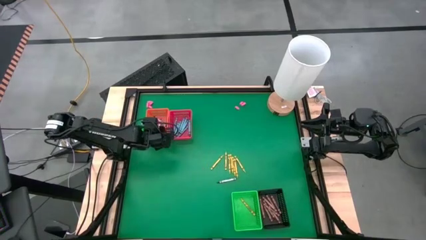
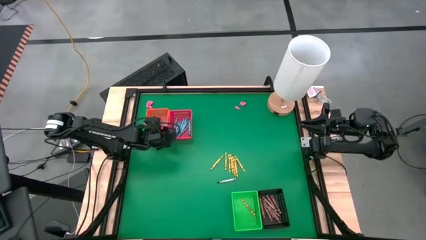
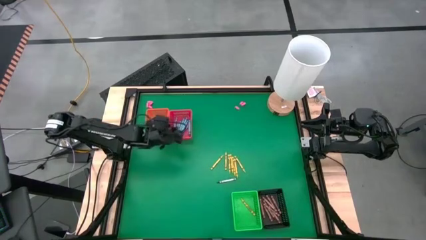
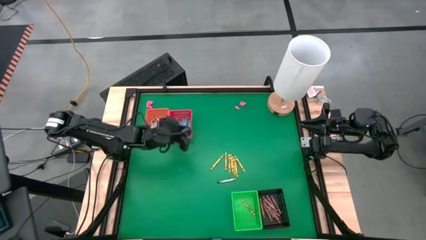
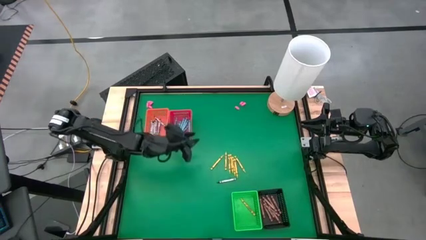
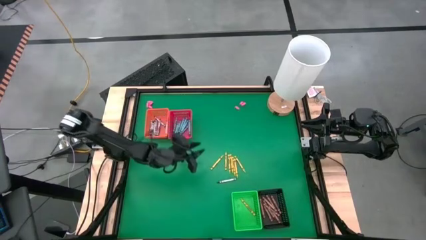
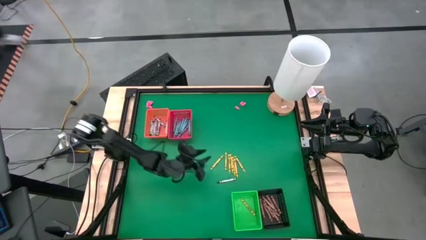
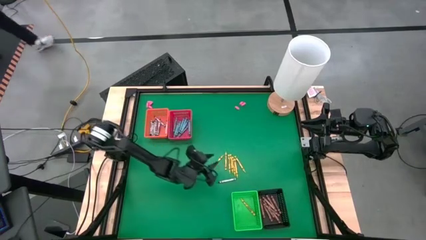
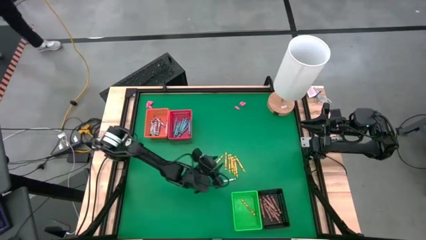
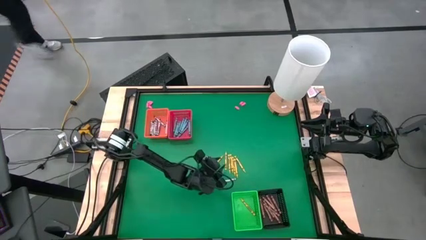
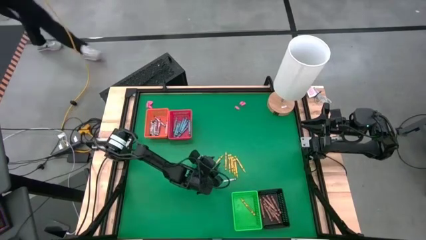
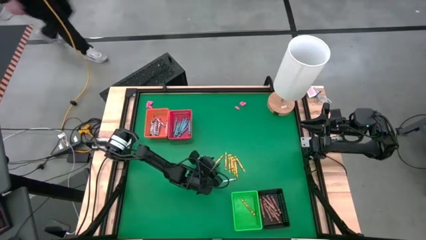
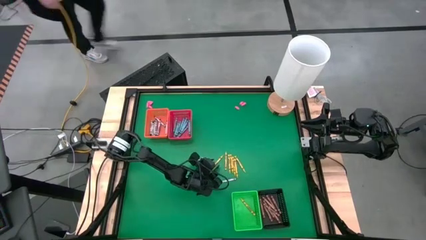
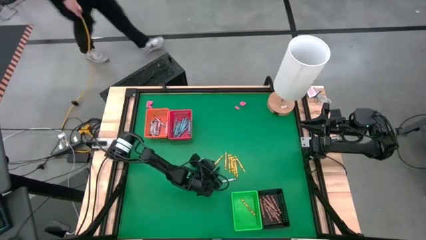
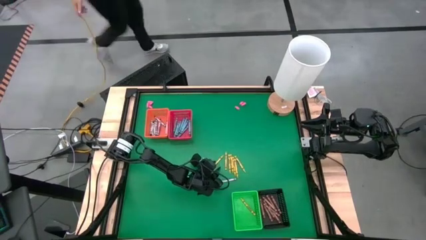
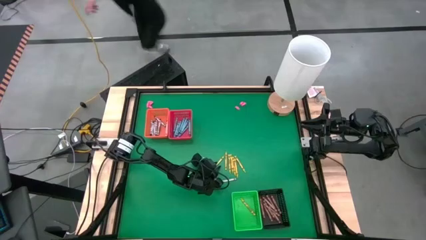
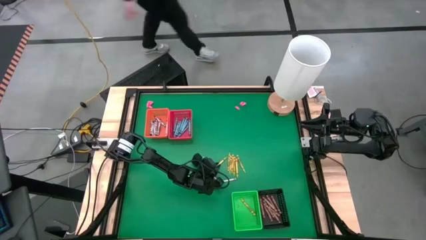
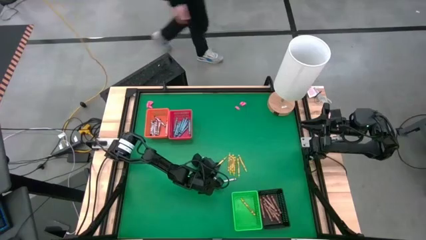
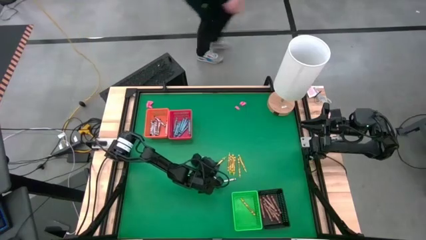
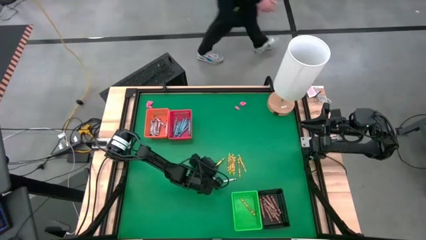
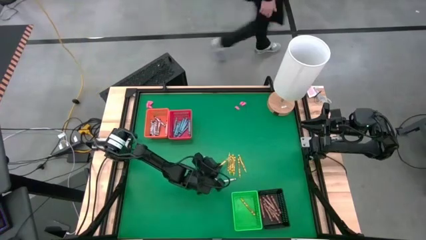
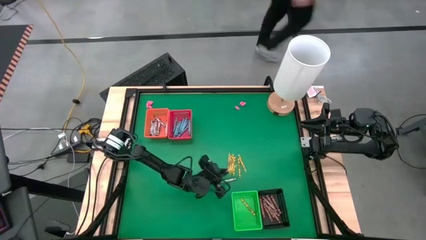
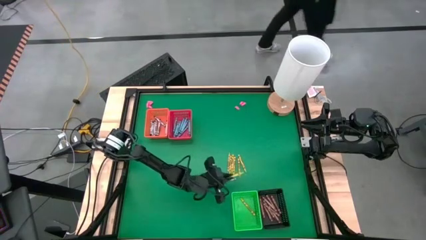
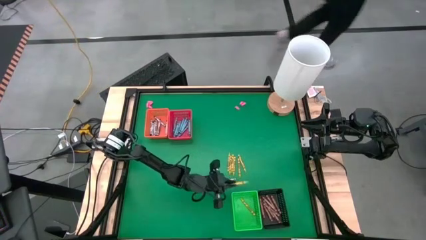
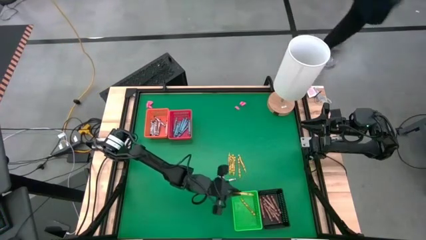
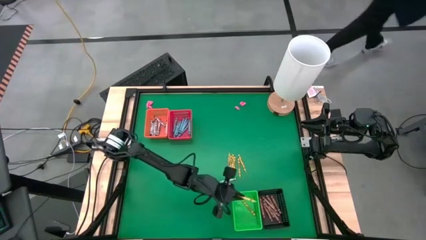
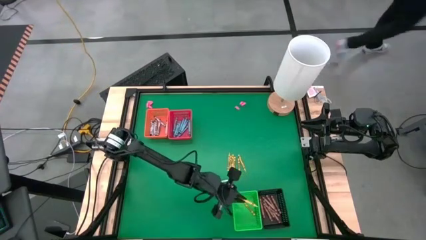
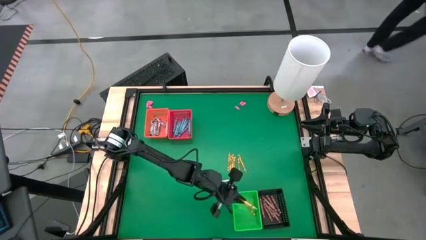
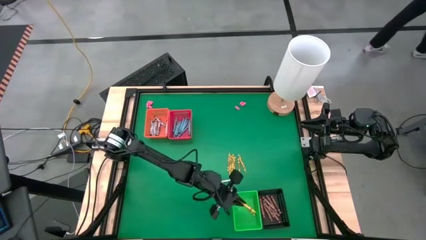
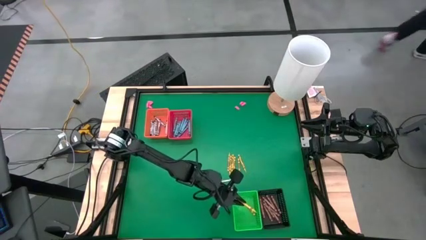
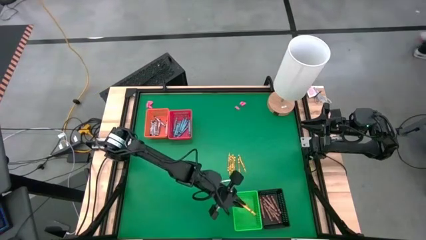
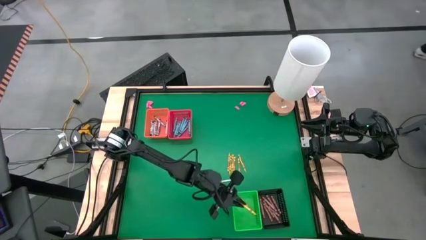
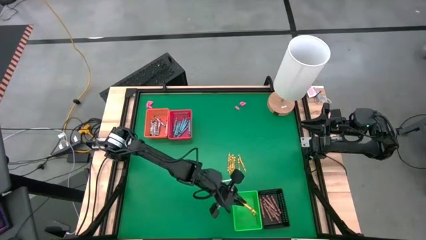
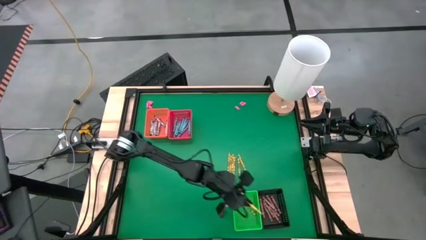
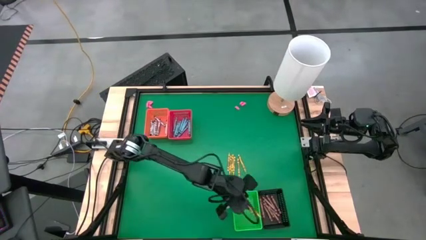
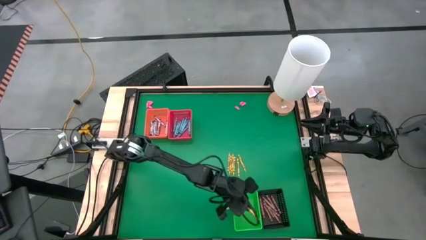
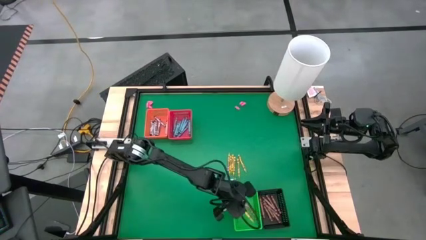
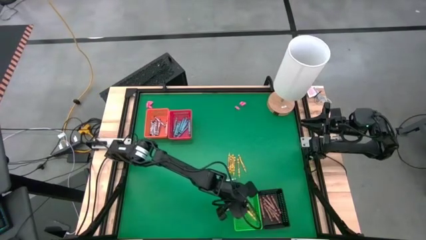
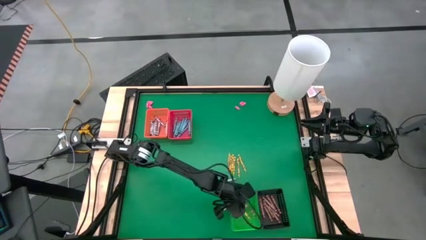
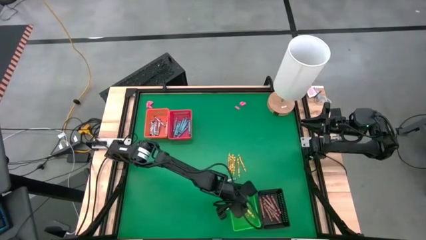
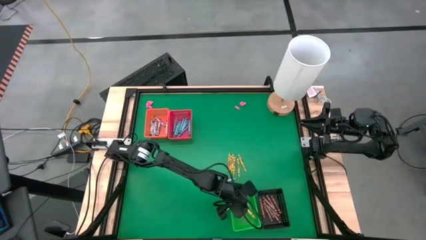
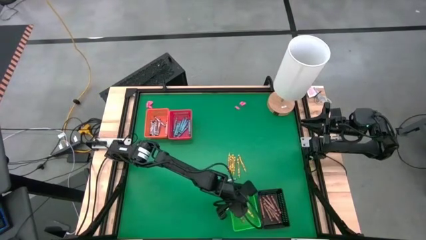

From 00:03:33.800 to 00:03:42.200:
Task: Sort crayons
Put the yellow crayon into the green bin

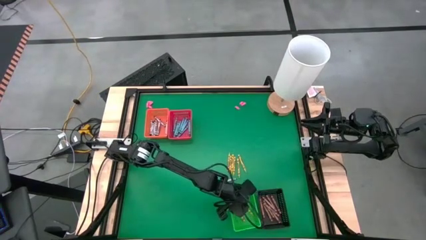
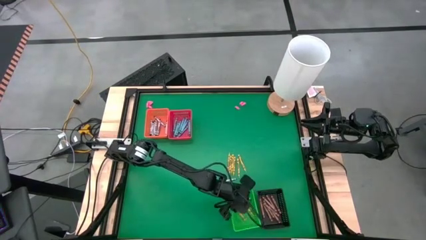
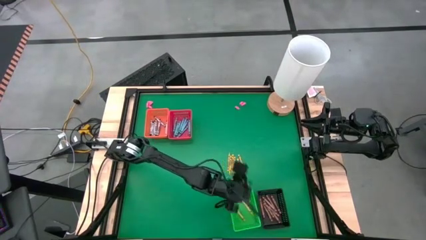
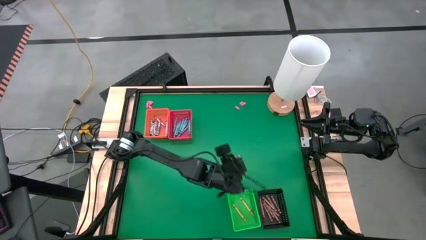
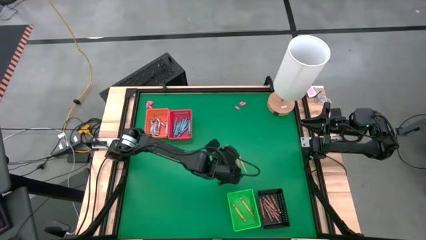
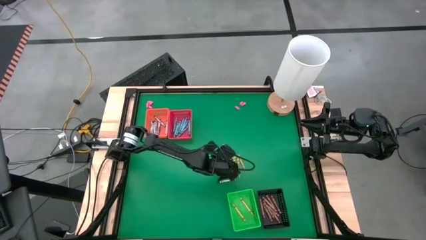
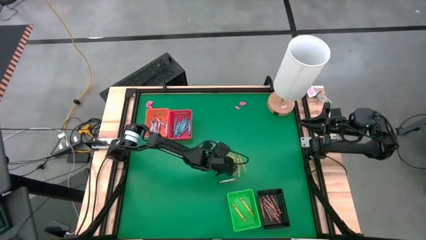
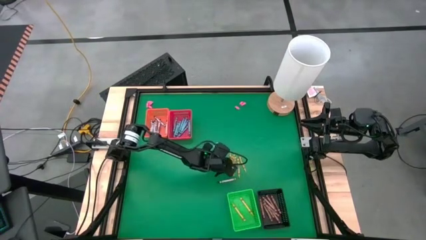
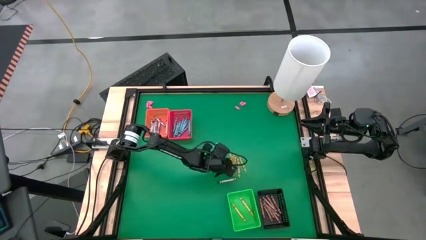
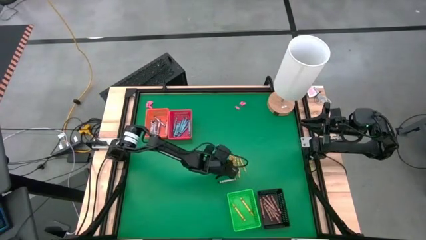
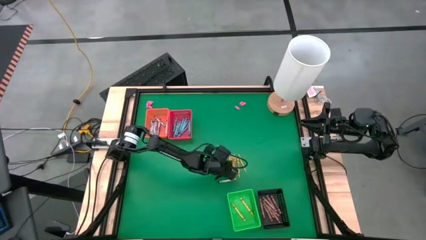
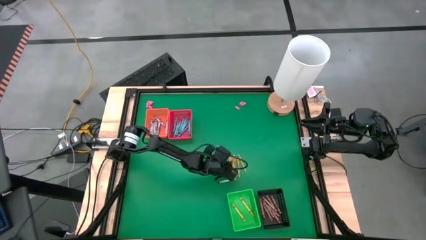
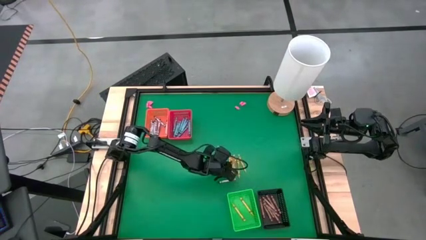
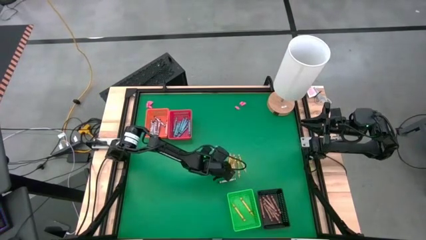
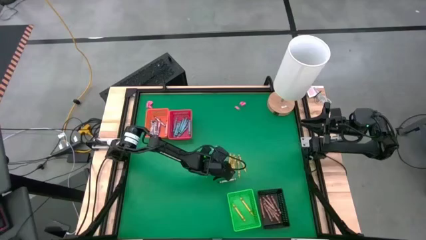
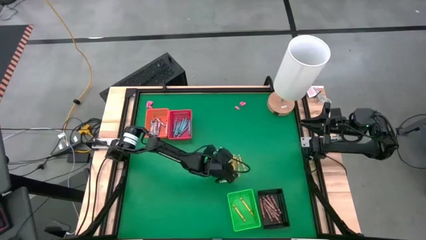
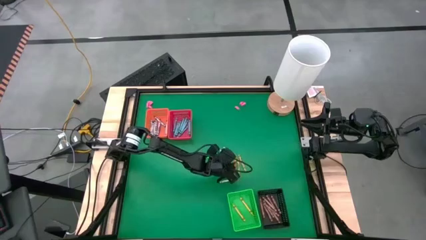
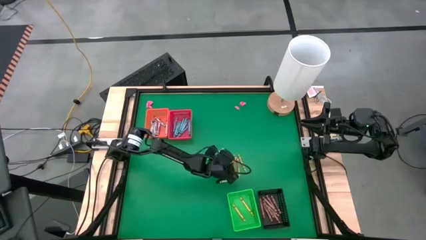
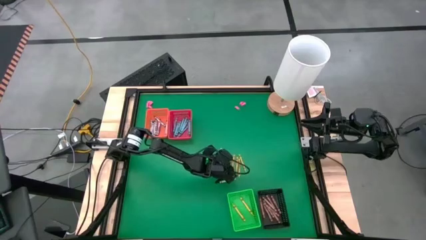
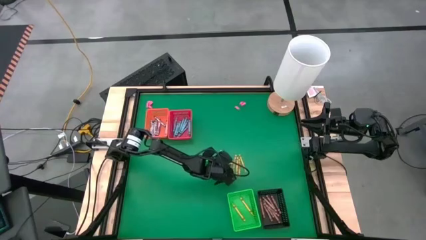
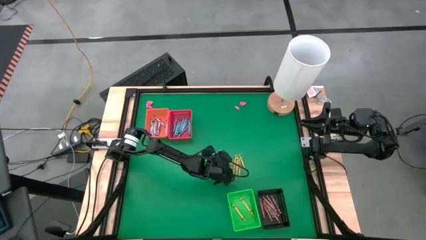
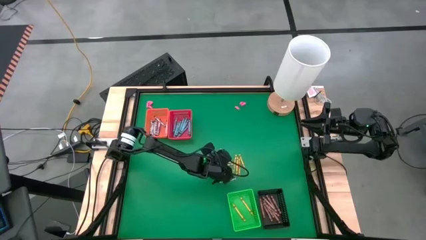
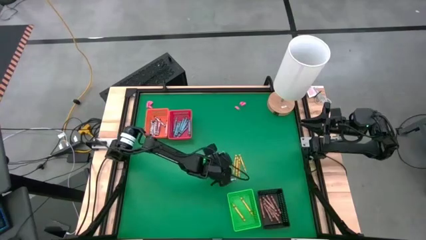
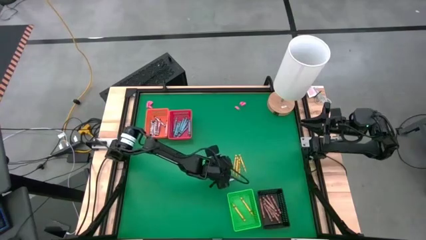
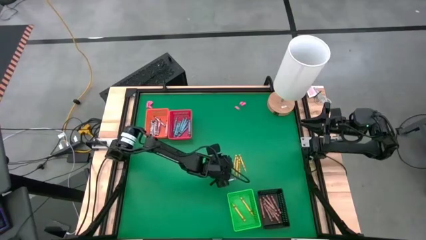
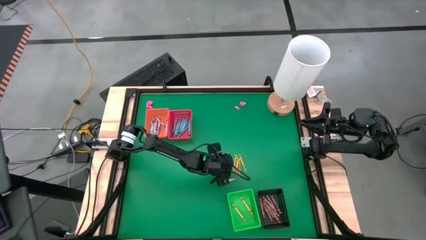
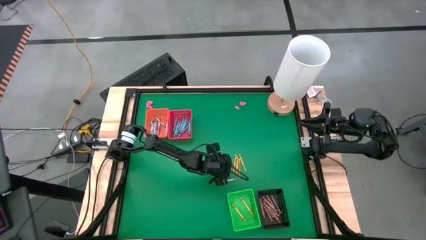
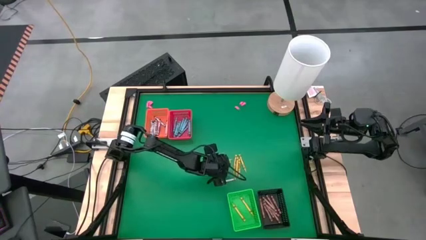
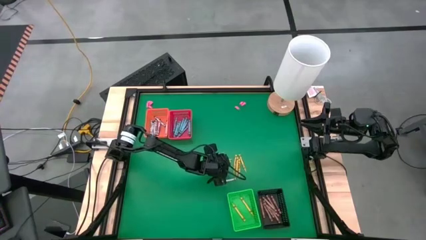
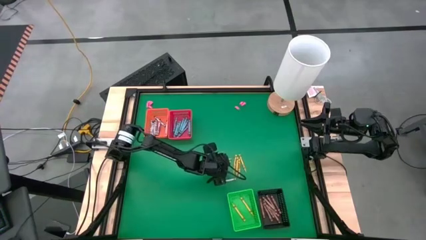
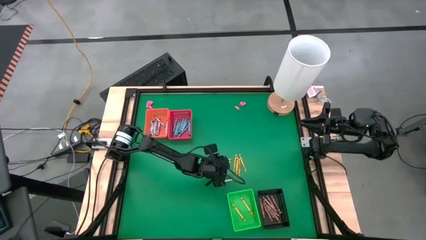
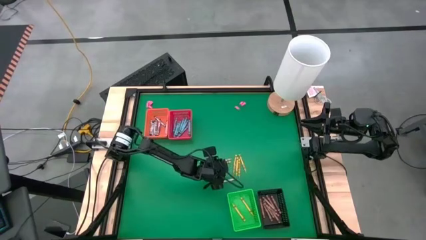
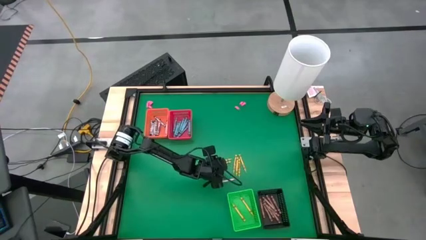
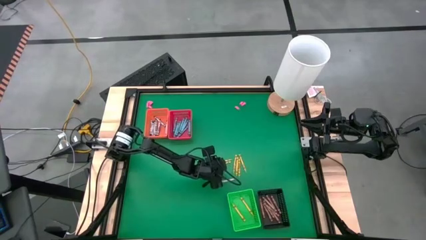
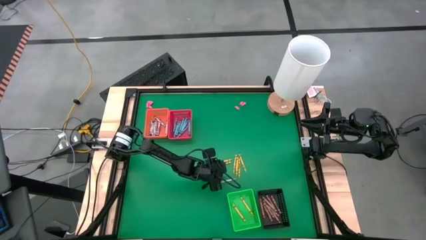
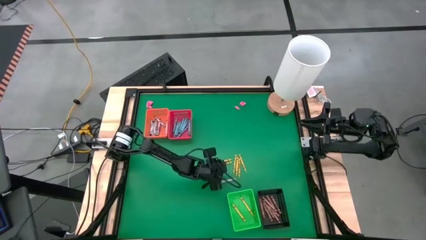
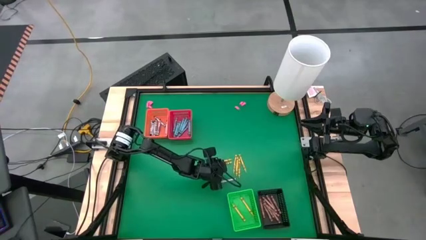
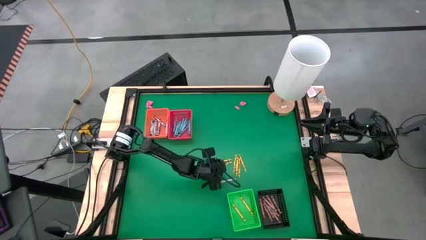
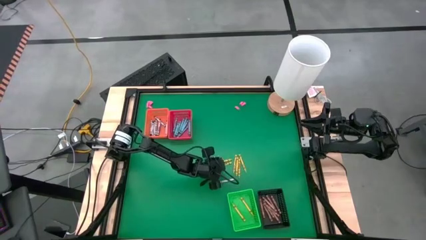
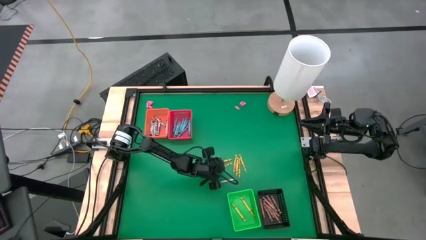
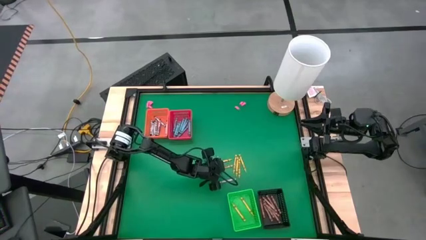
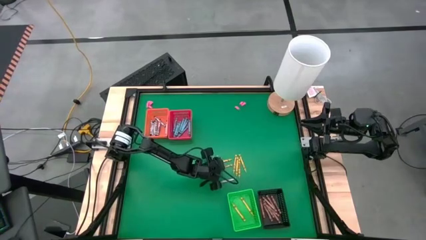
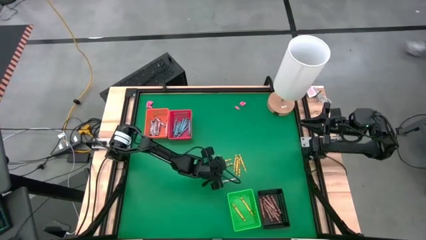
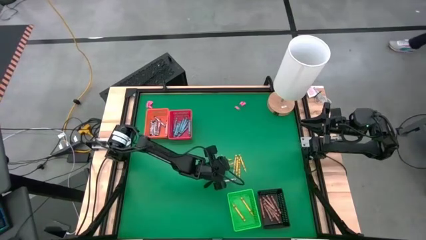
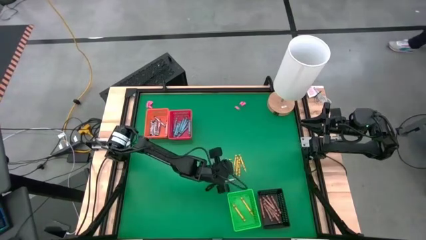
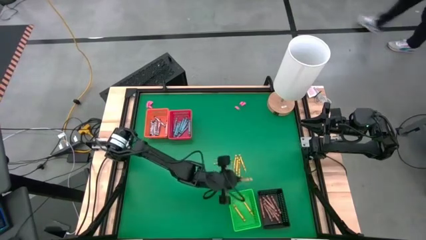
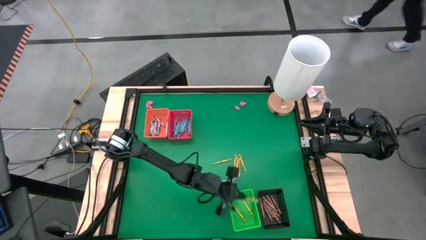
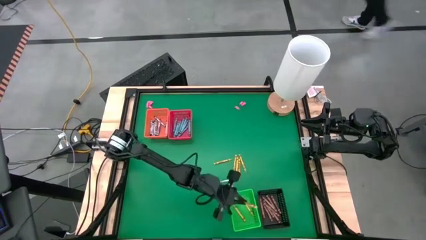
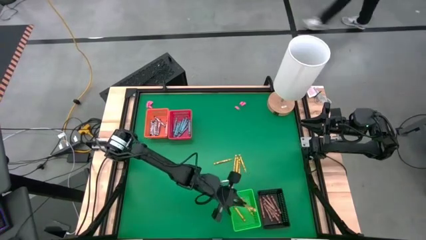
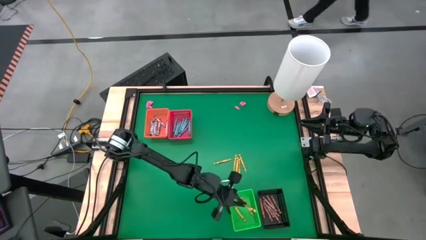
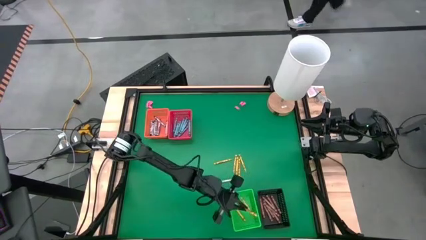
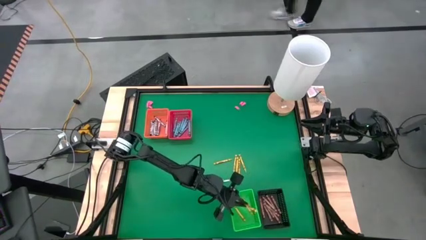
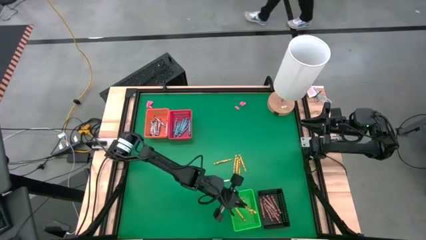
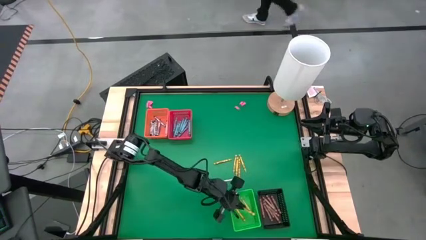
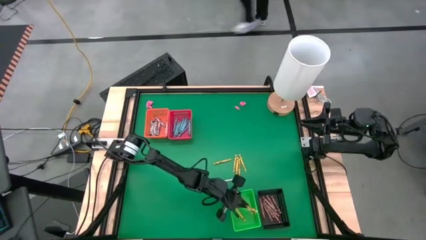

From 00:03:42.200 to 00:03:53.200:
Put the yellow crayon into the green bin
